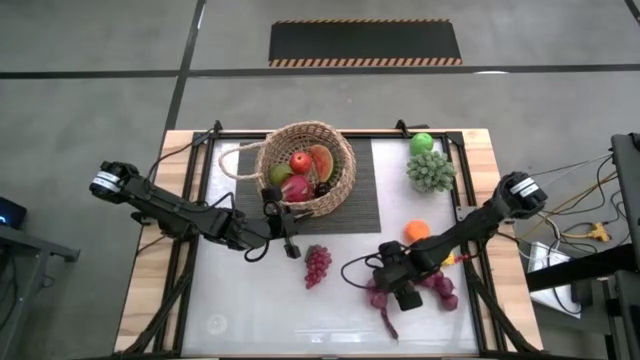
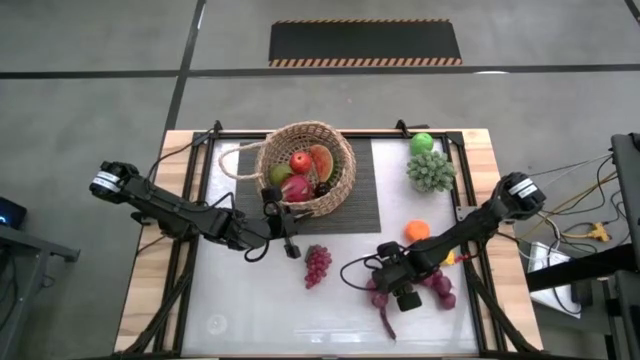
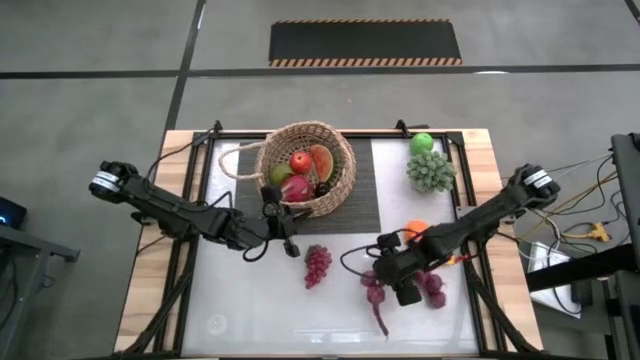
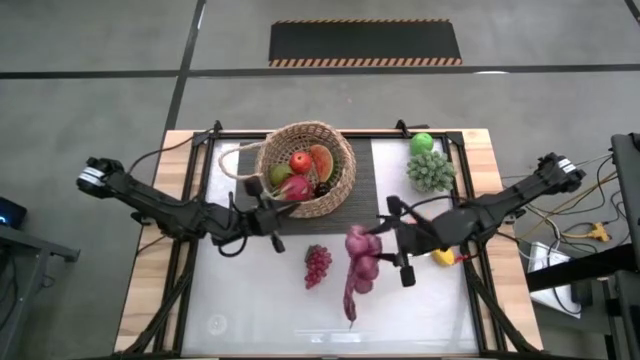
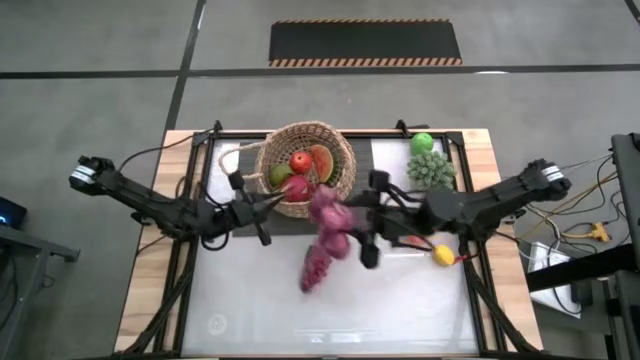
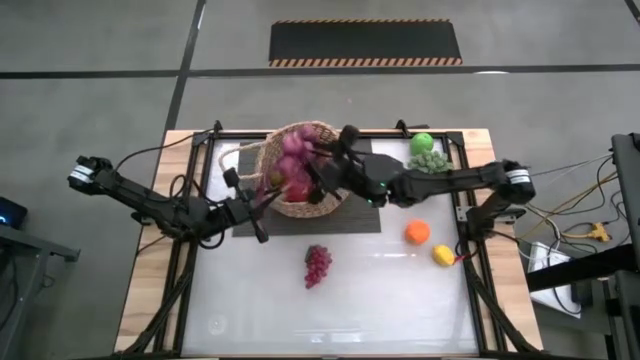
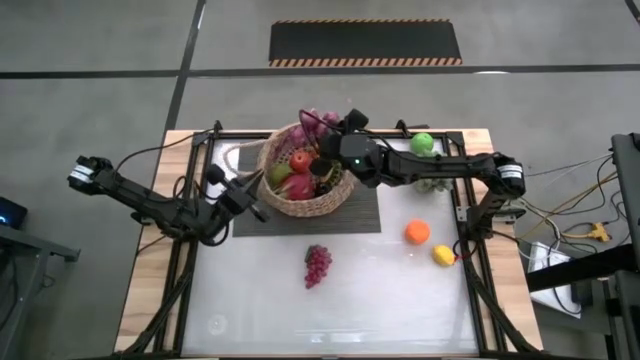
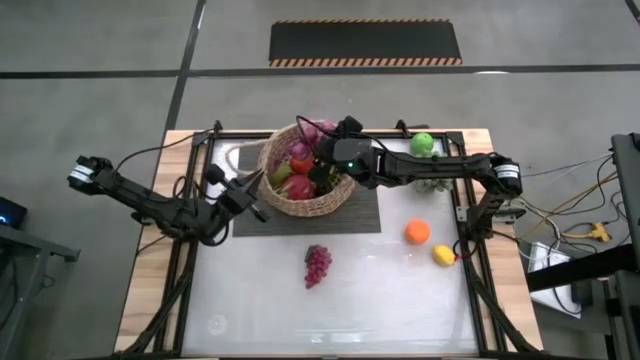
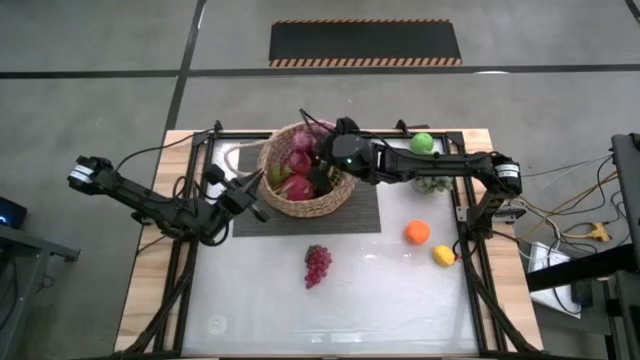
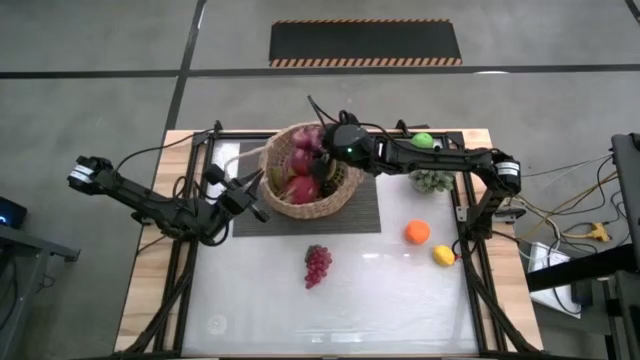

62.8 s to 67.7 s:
Task: Build produce basket
Put the purple garlic into the basket

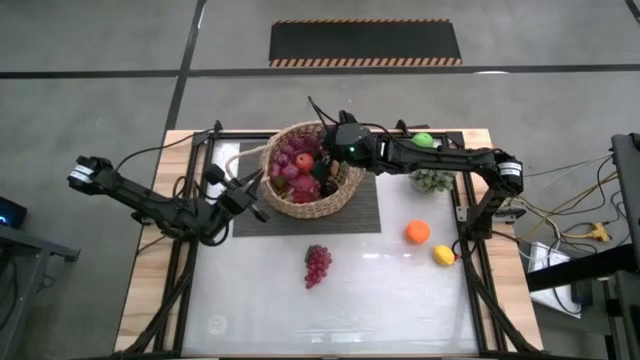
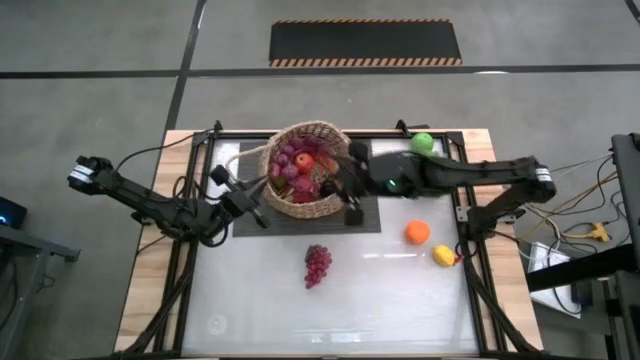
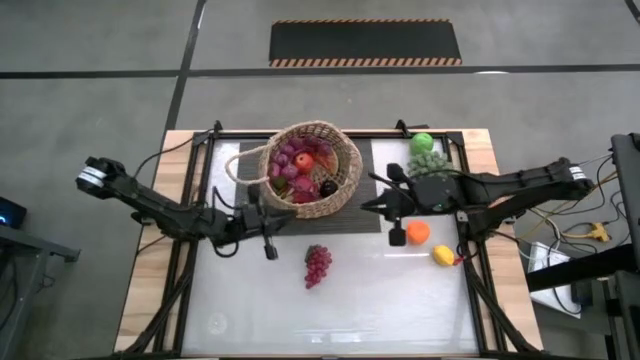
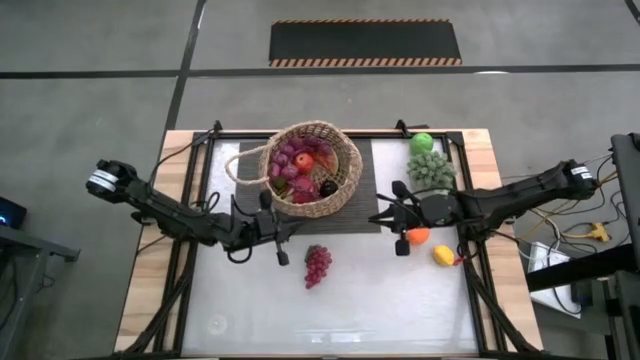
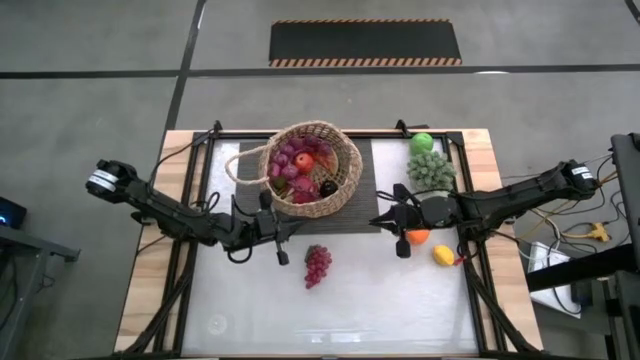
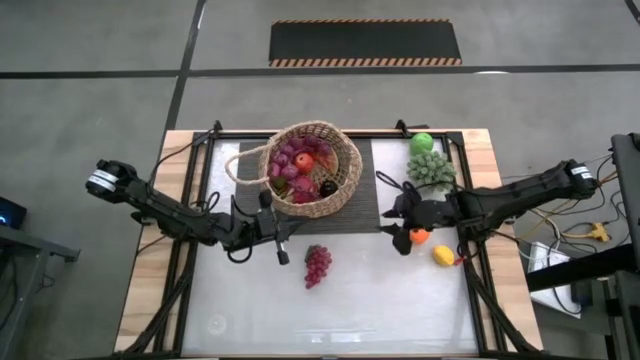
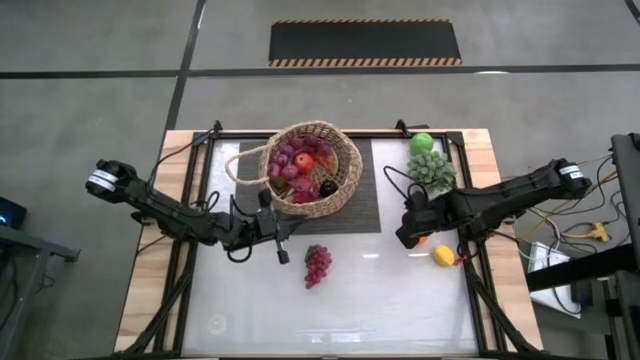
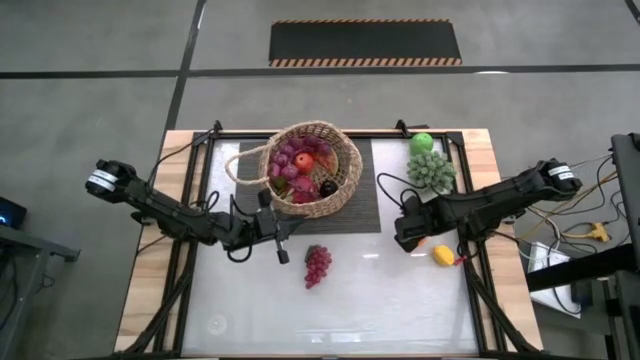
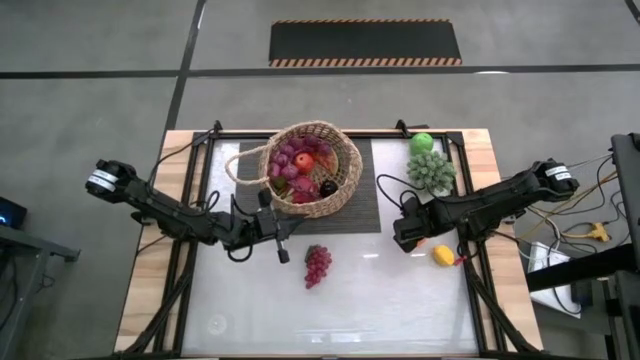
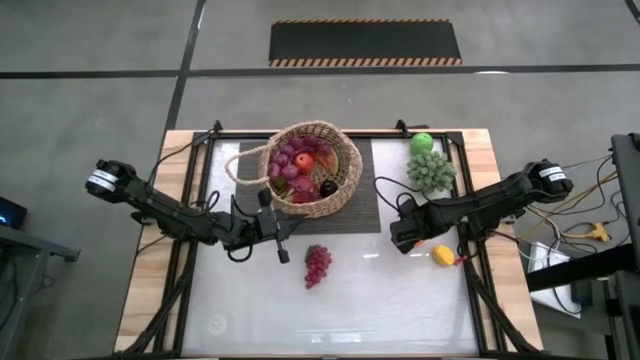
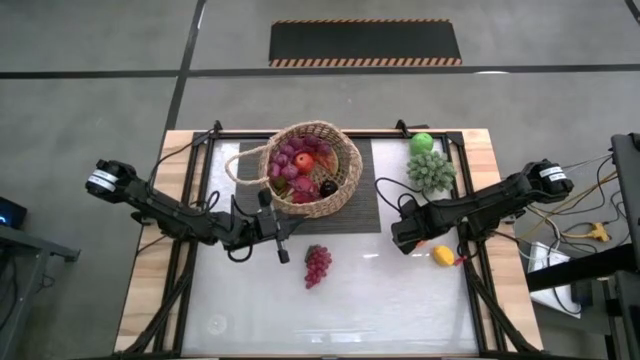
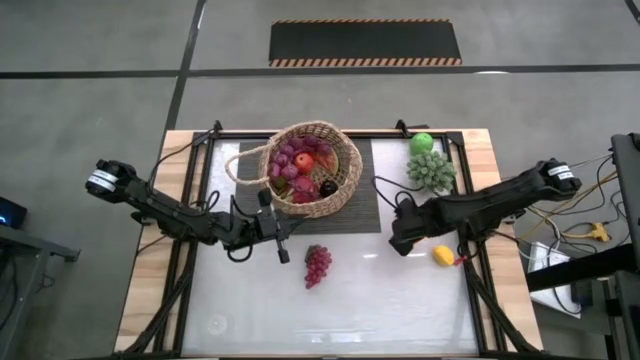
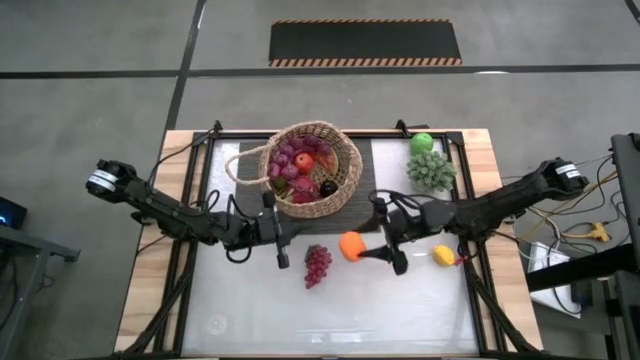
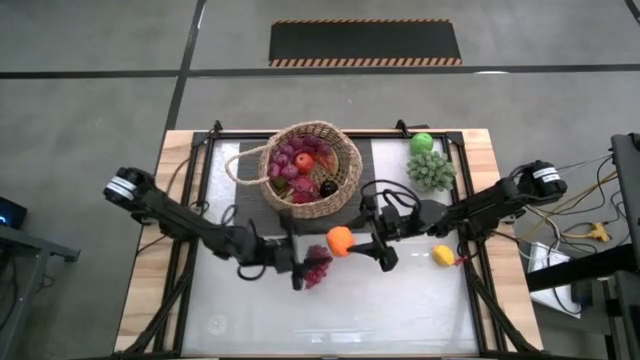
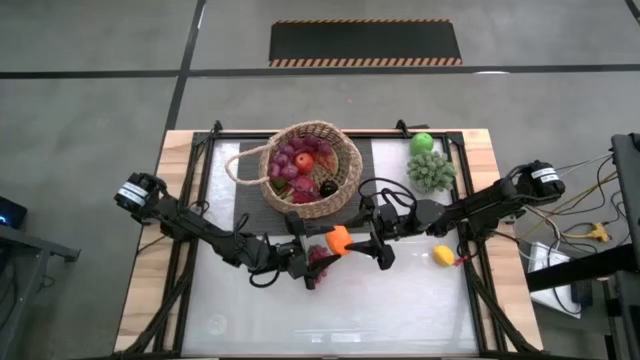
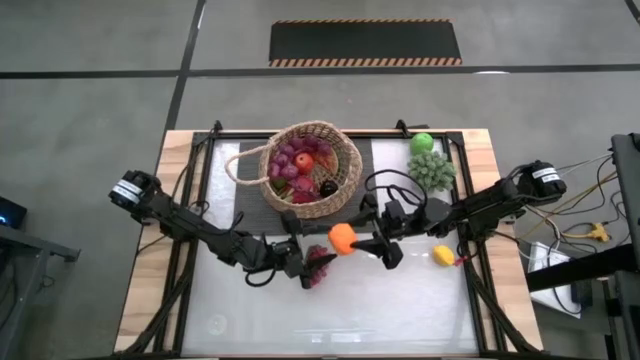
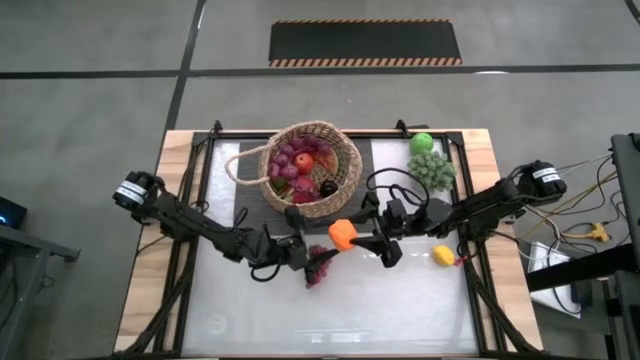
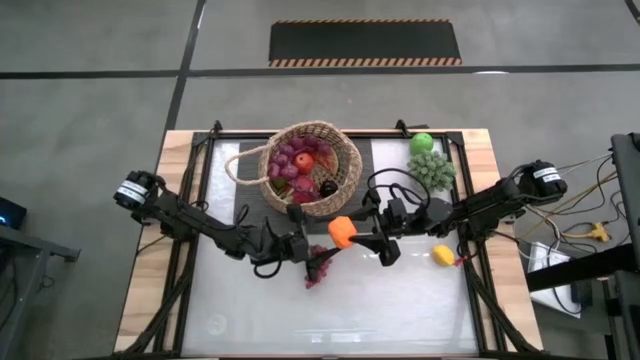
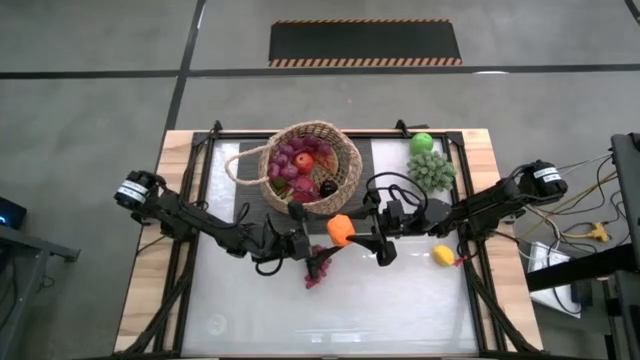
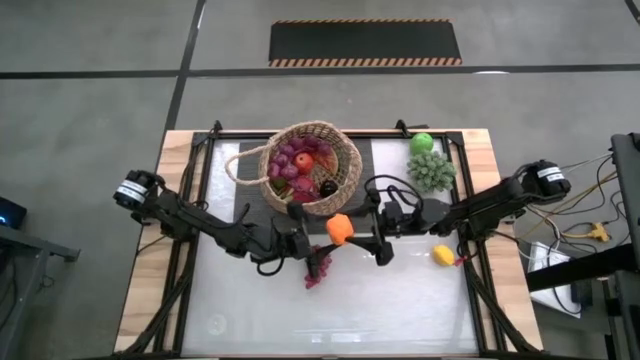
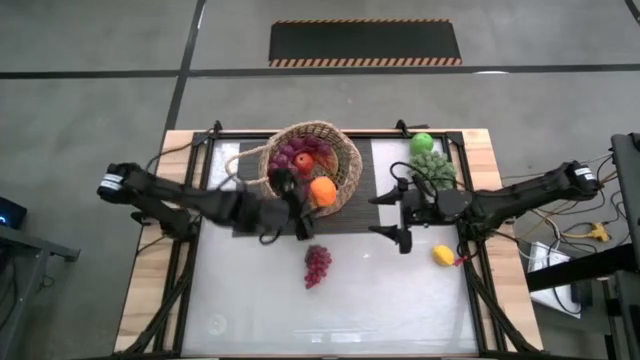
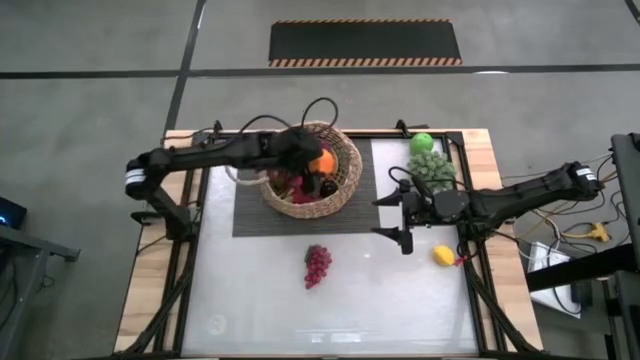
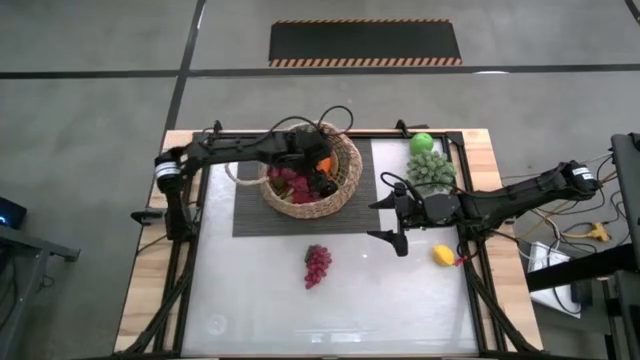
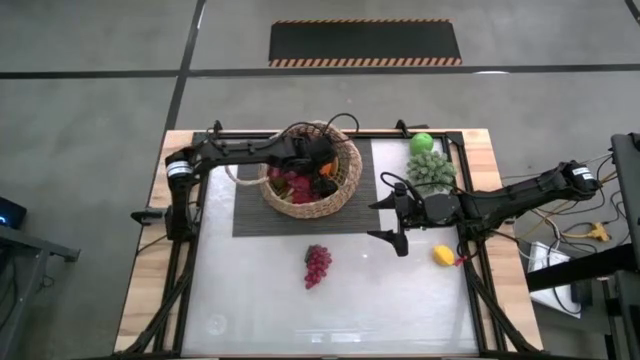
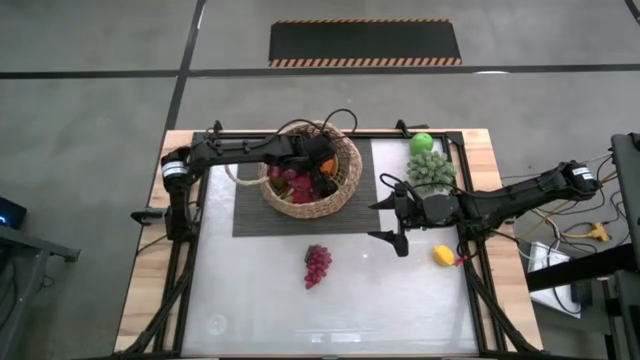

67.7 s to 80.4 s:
Put the orange into the basket

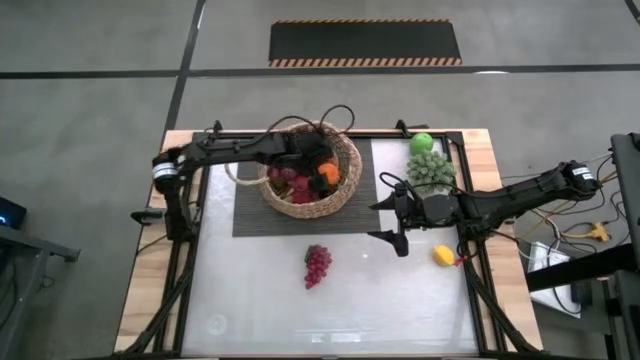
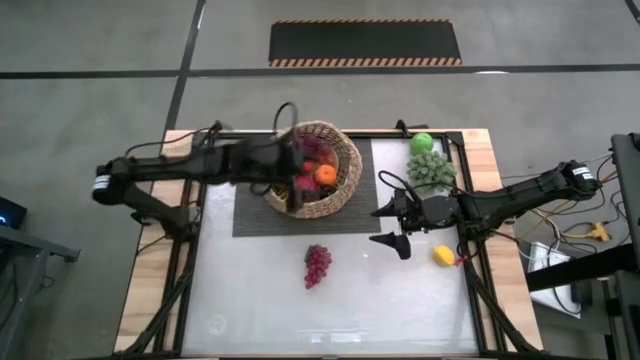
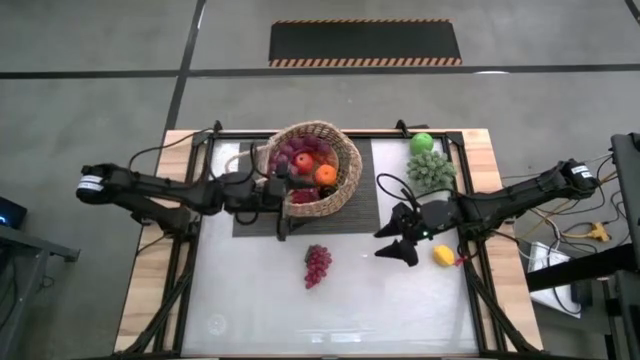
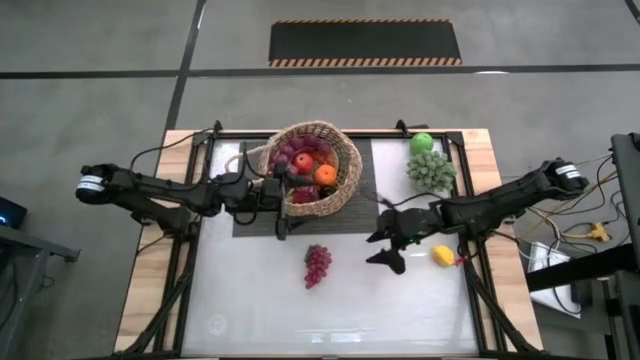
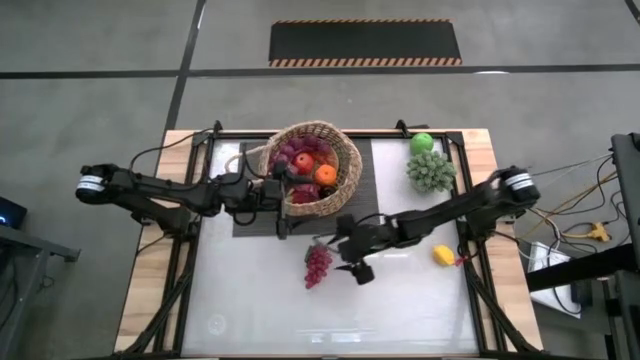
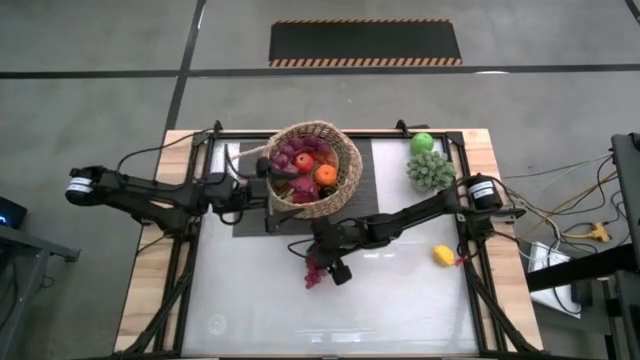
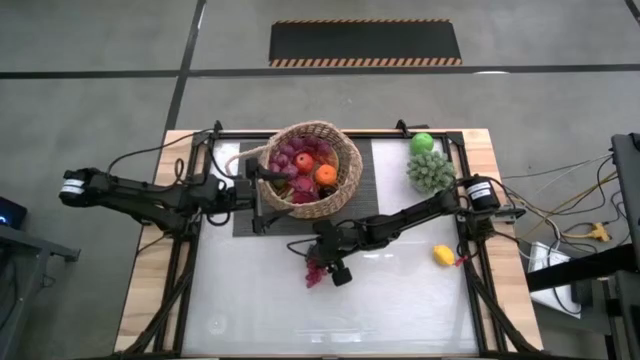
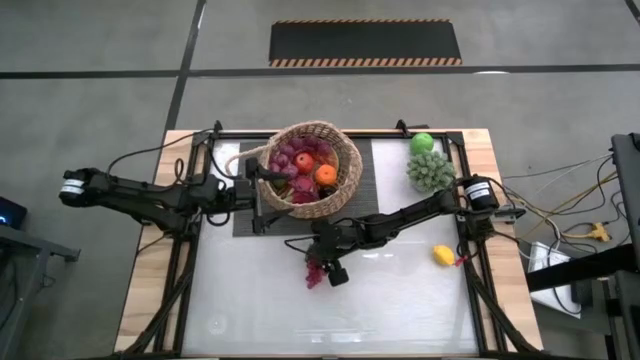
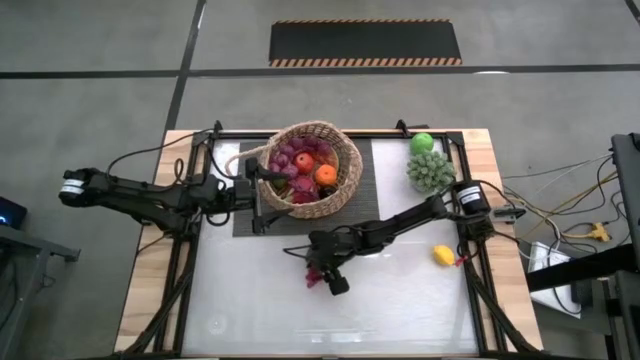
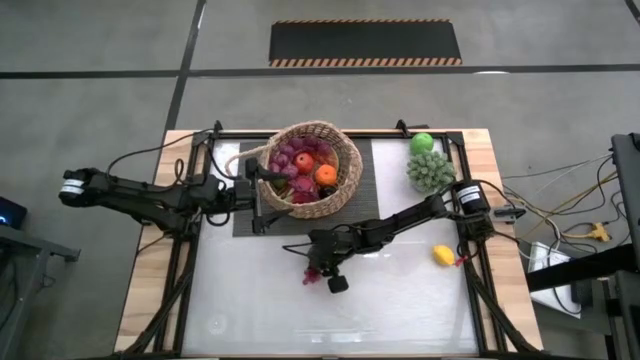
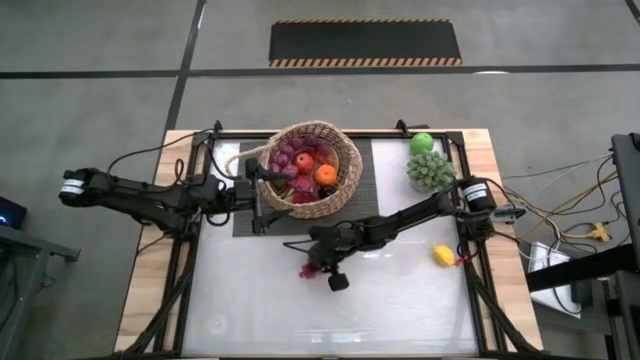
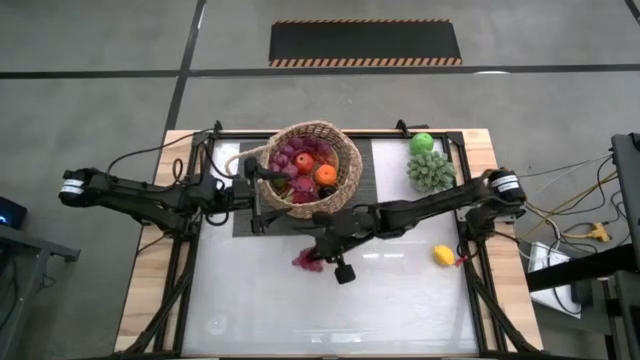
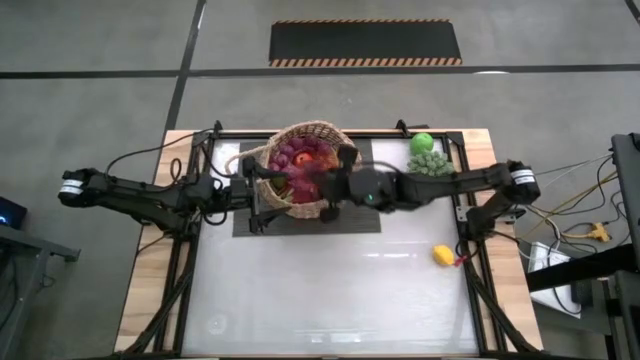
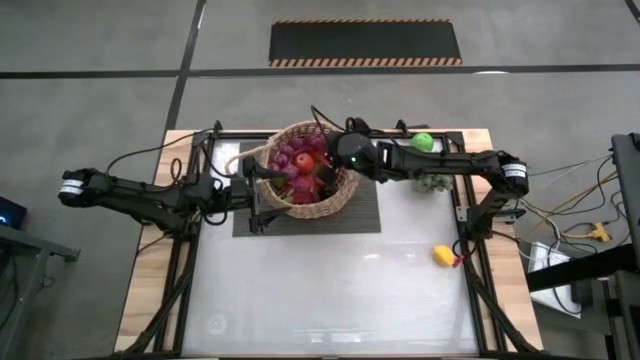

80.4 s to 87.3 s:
Put the grapes into the basket
